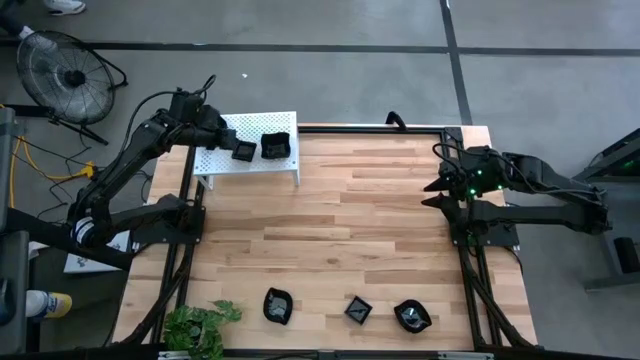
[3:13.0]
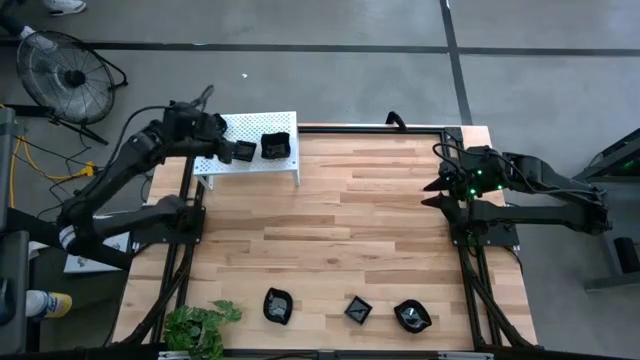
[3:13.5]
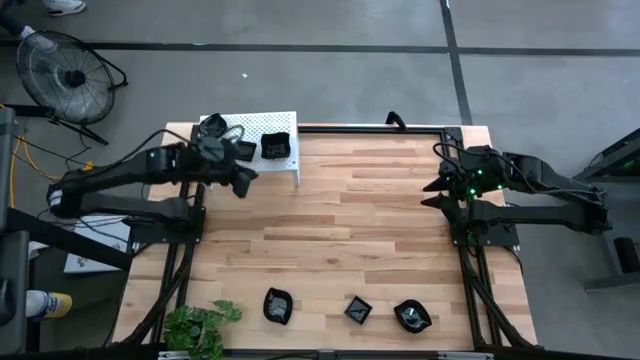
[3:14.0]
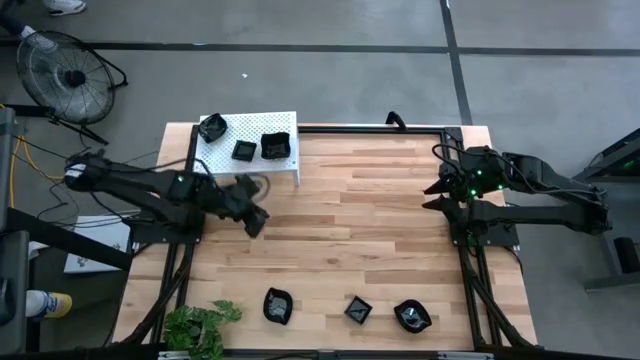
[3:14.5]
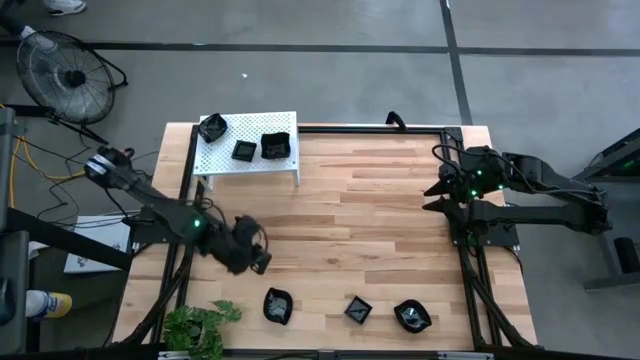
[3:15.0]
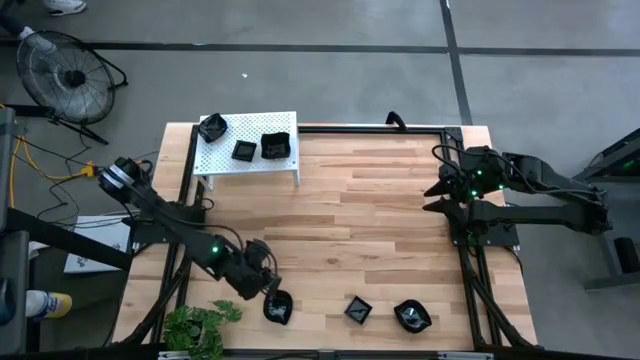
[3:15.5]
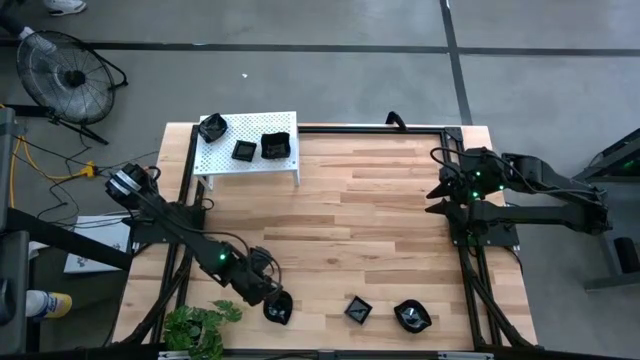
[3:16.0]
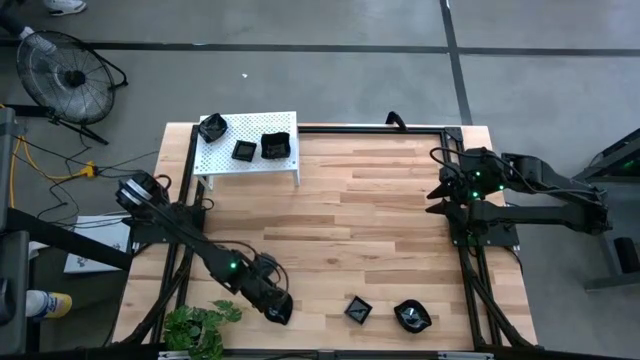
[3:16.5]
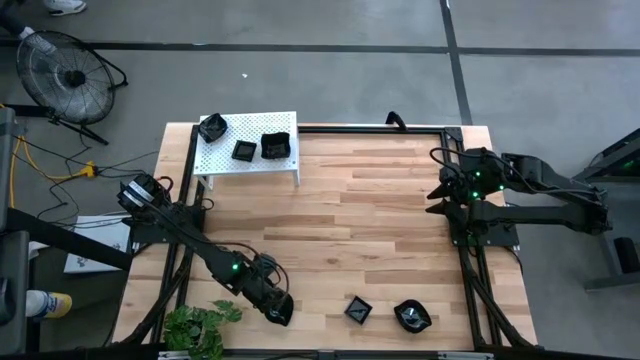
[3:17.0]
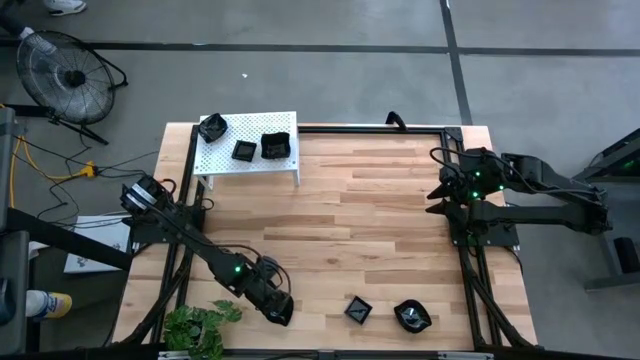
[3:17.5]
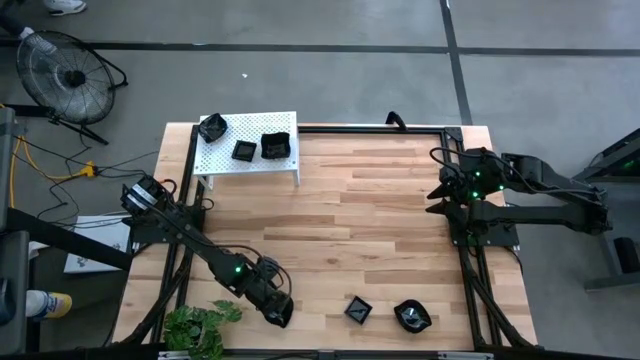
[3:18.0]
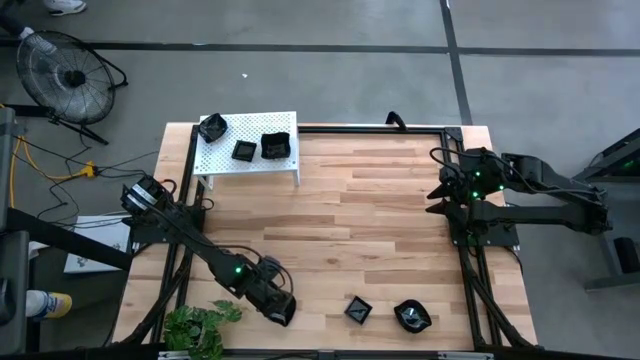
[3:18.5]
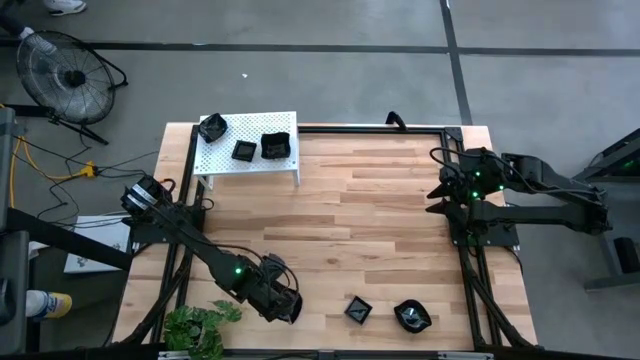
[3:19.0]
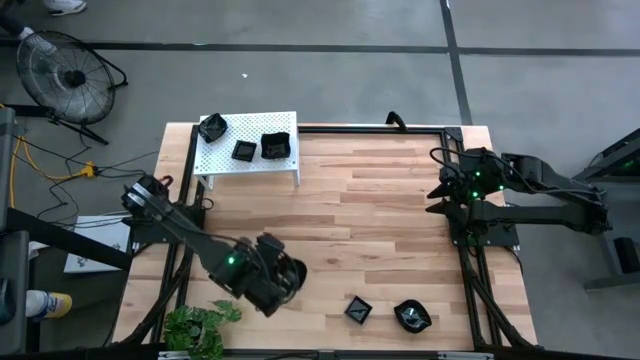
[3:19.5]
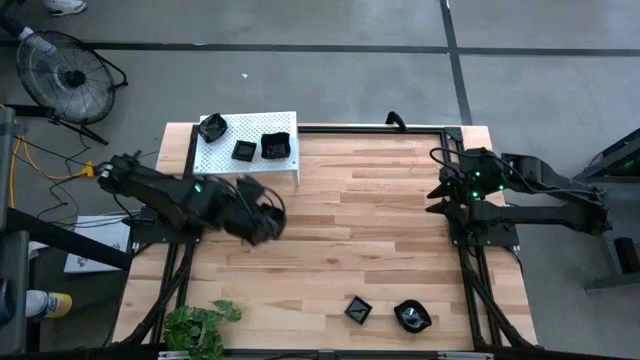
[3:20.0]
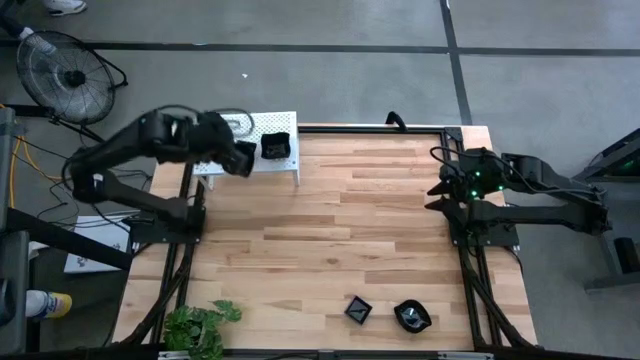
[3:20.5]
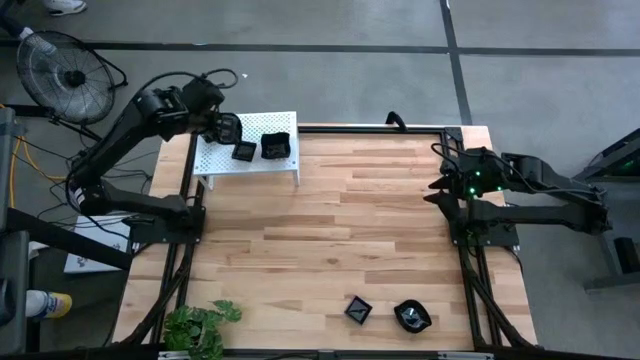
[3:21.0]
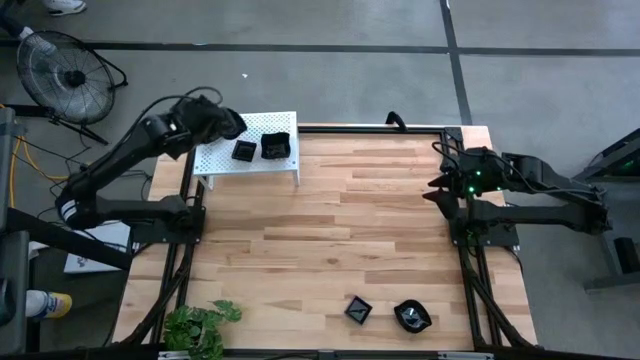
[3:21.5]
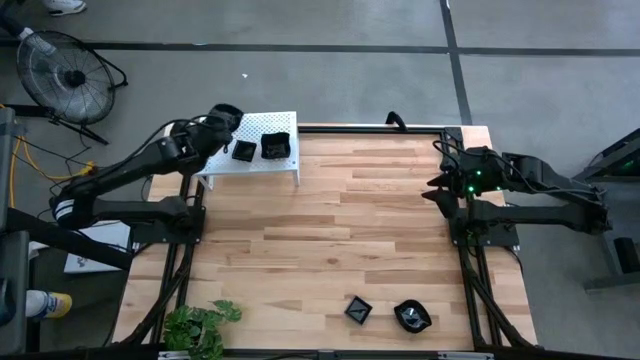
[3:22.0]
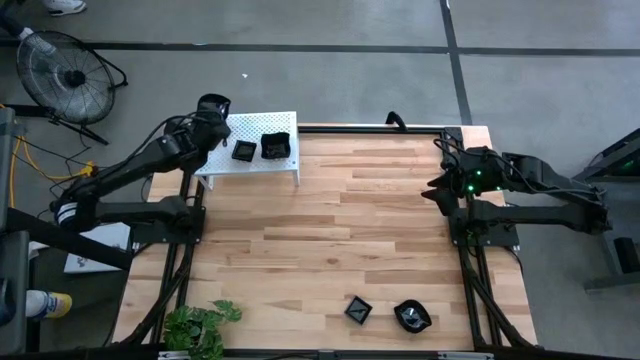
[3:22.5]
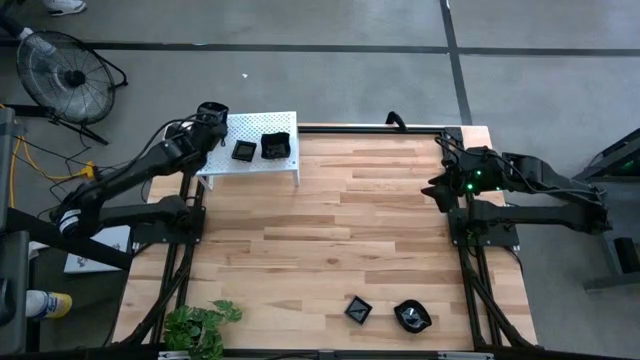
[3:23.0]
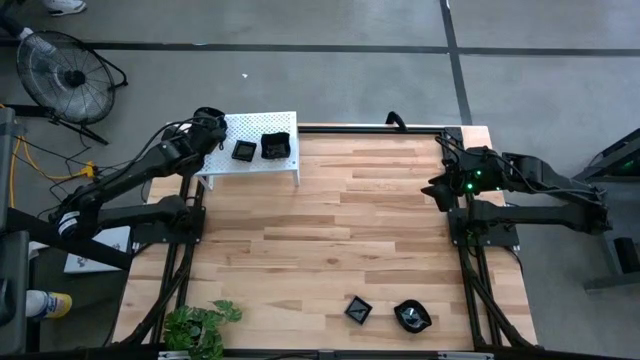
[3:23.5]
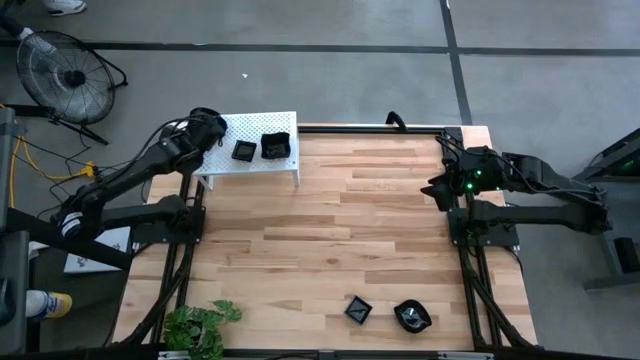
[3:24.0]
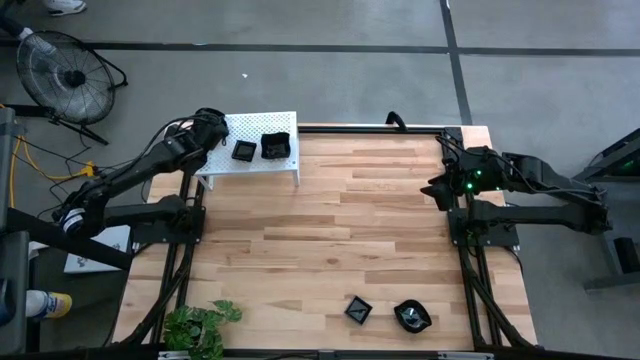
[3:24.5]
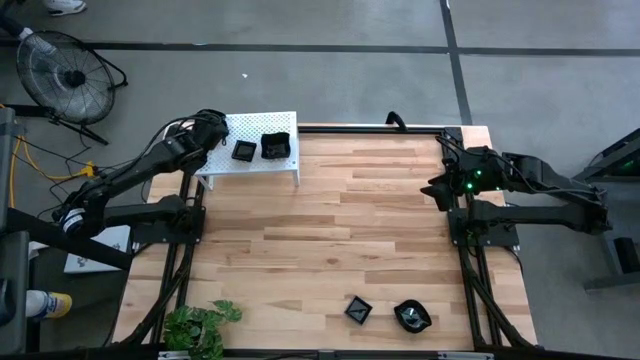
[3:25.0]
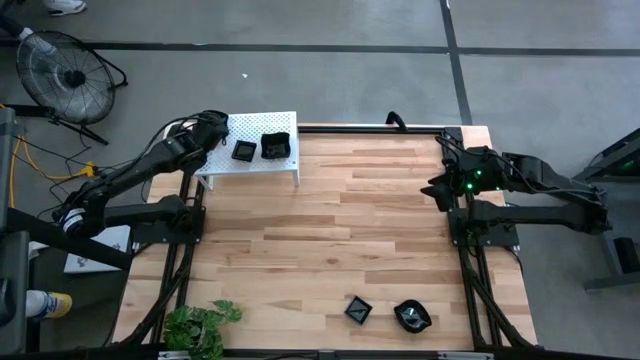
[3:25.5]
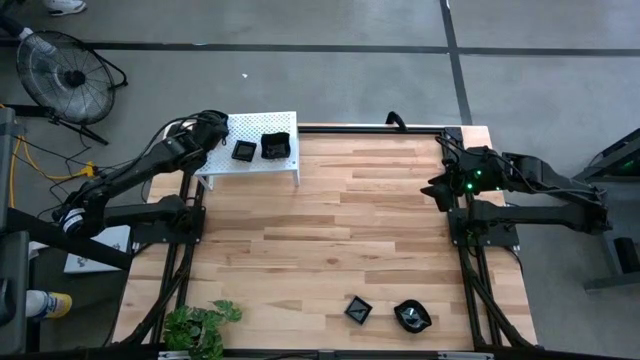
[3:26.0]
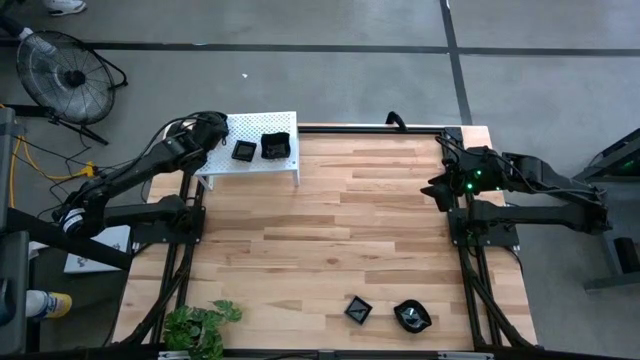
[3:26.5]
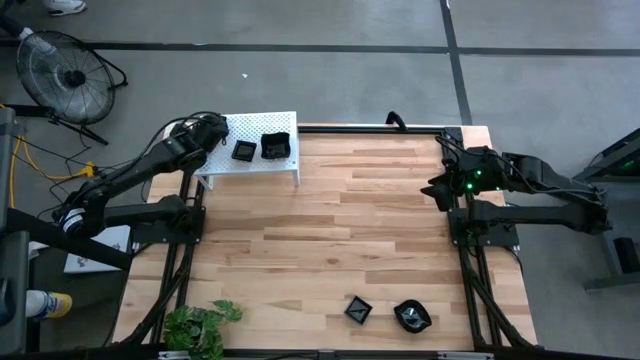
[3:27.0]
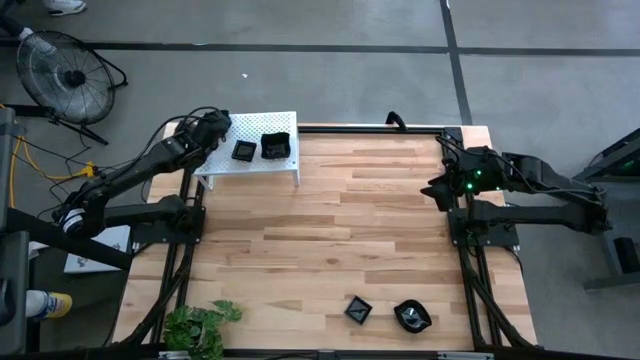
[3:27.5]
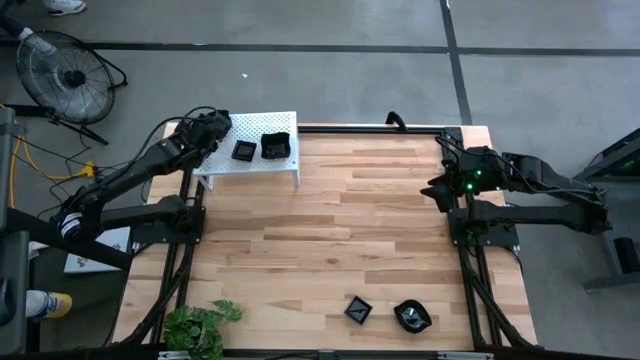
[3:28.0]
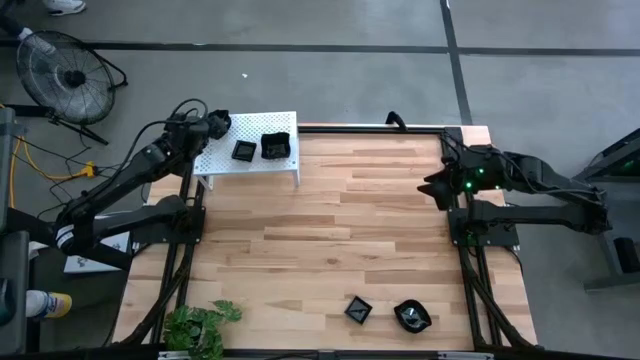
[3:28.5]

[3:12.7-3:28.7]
Task: Pick & Place Mini shaped plates
Stack the black leaf shaped plate on top of the black leaf shaped plate on the shelf

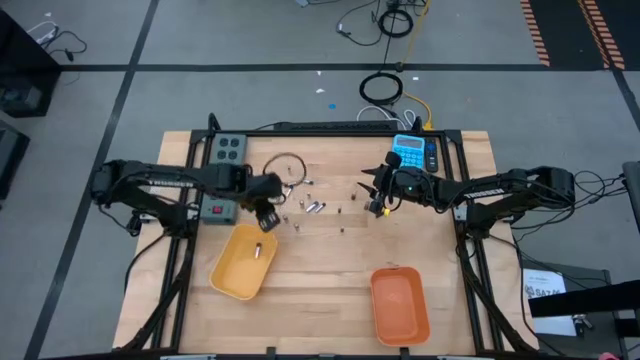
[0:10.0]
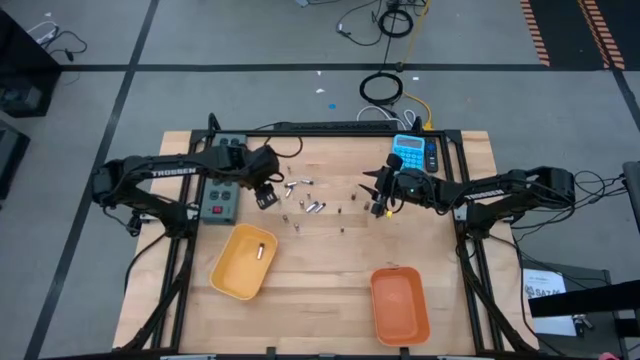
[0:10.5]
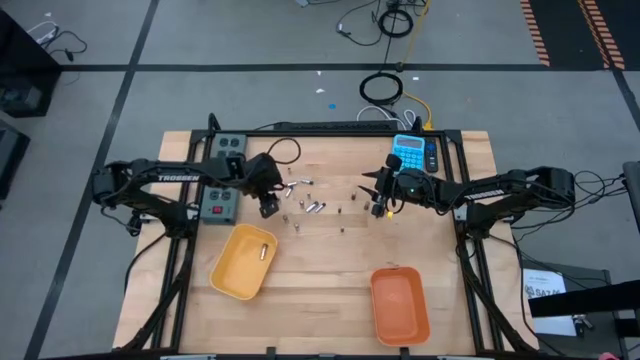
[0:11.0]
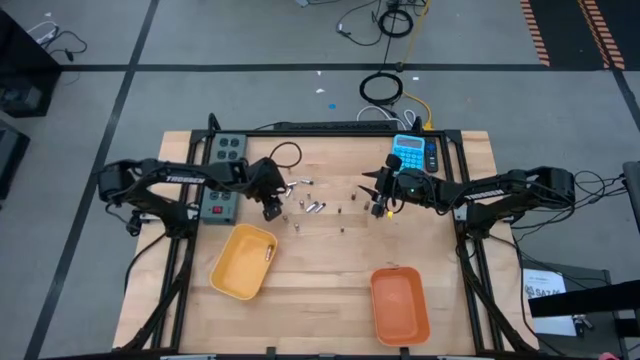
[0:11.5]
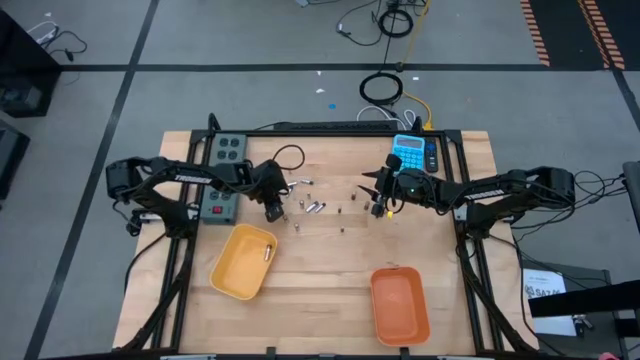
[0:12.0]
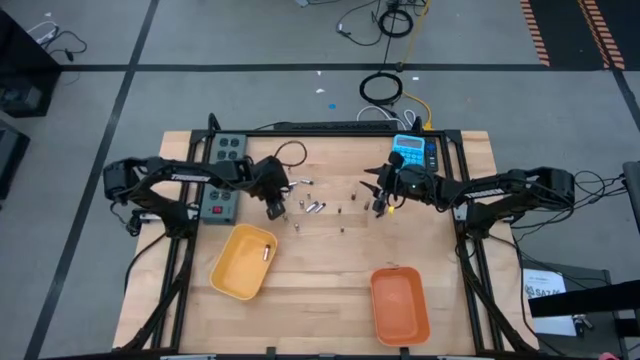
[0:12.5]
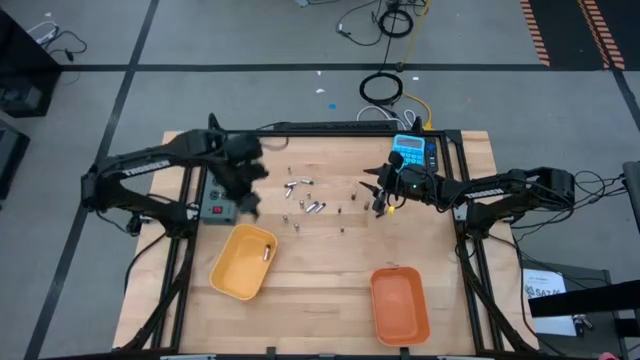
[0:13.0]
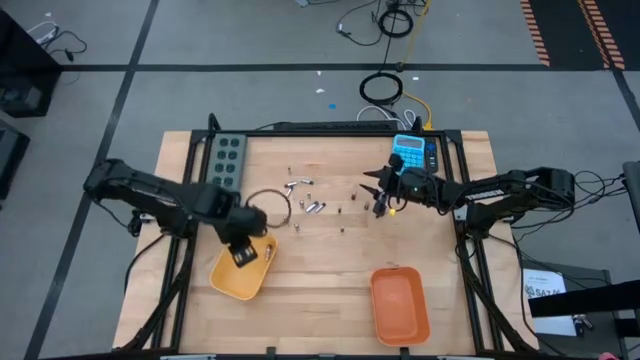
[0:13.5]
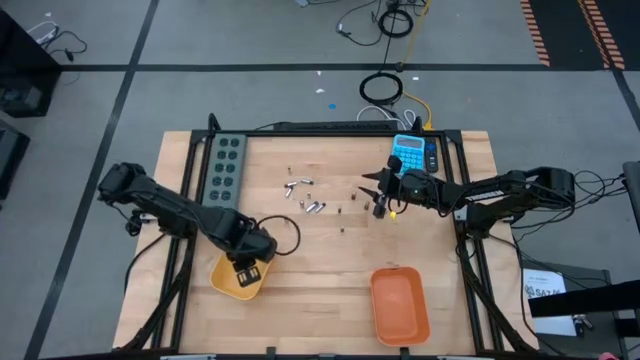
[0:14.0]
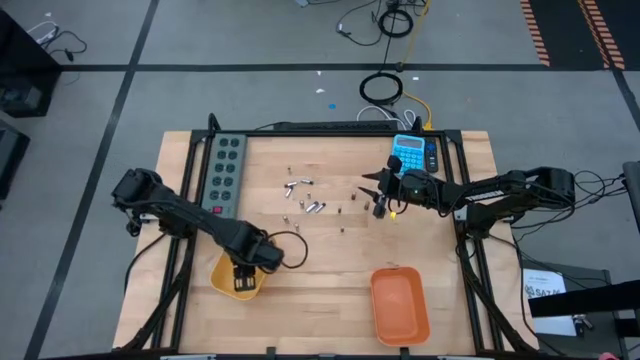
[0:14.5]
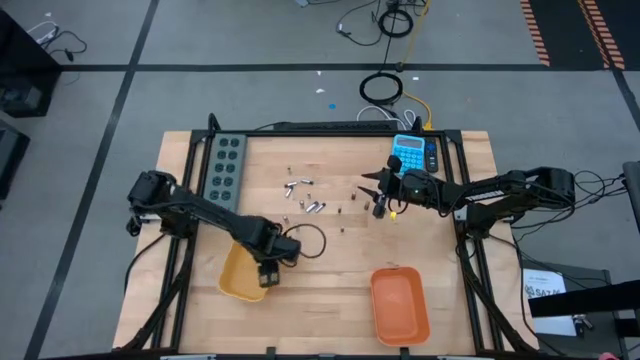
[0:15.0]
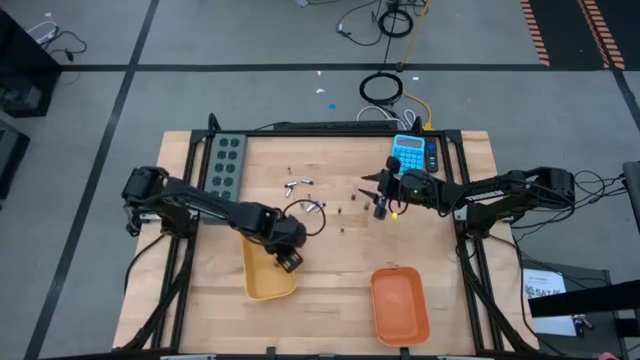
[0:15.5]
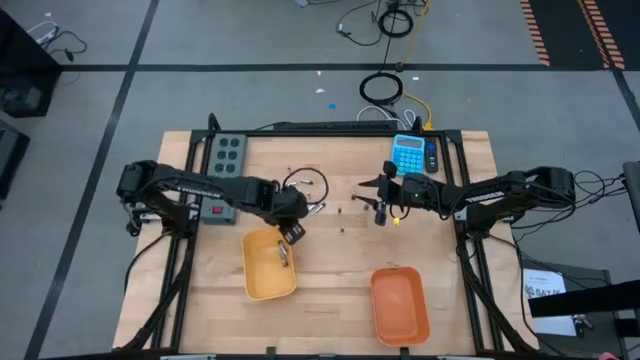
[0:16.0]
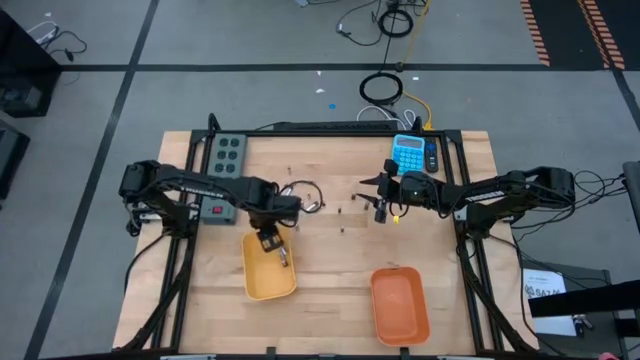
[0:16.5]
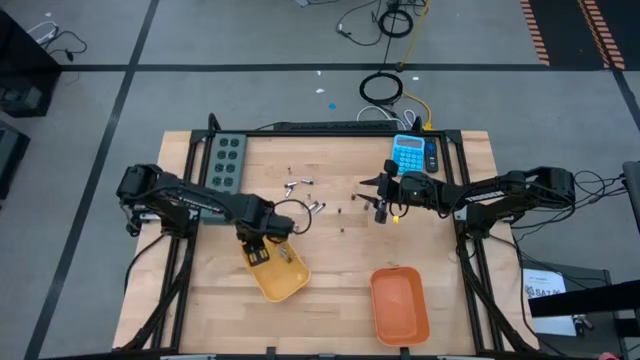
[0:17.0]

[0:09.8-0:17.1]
Task: Sort batteries
Put the silver battery into the yellow bin
